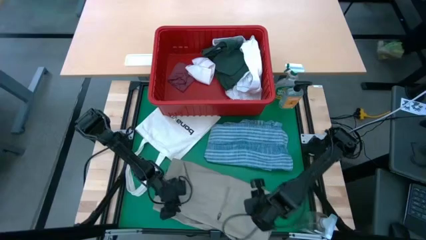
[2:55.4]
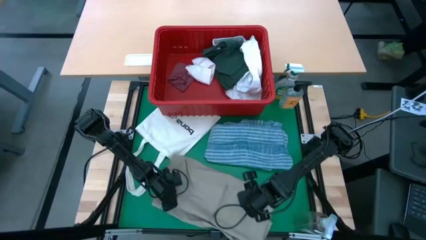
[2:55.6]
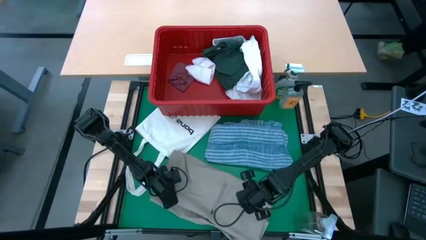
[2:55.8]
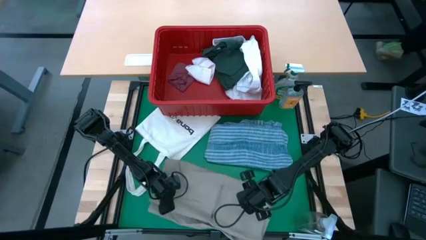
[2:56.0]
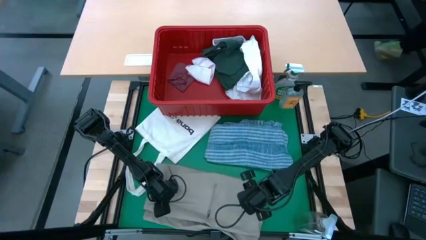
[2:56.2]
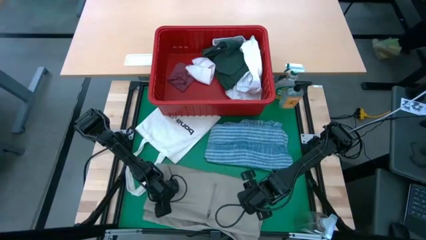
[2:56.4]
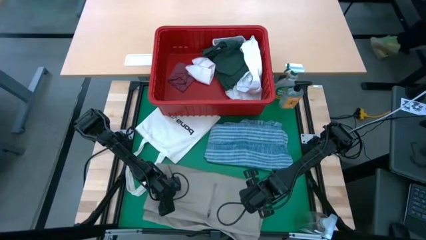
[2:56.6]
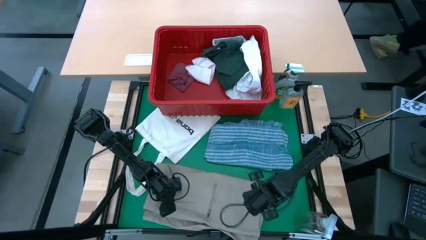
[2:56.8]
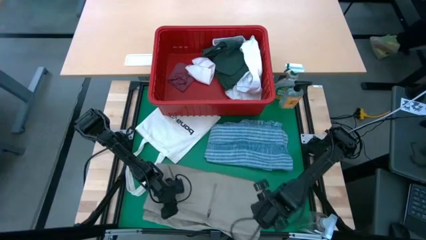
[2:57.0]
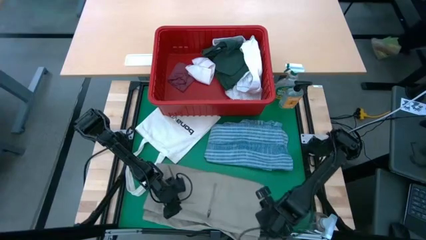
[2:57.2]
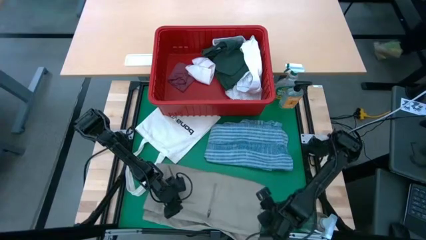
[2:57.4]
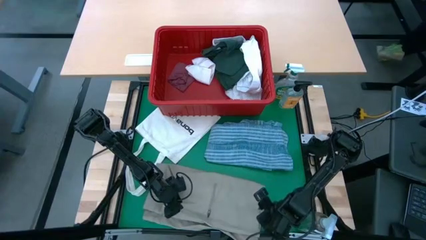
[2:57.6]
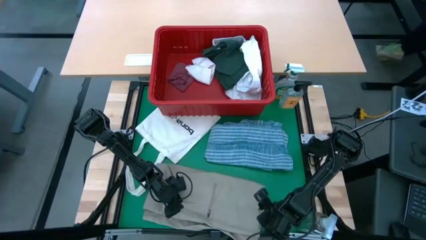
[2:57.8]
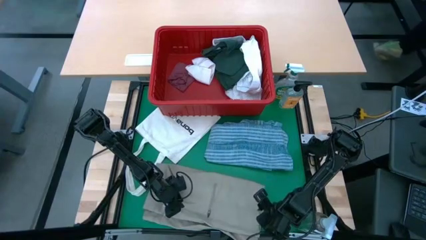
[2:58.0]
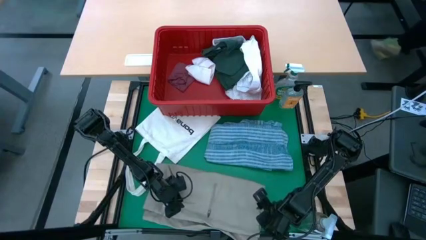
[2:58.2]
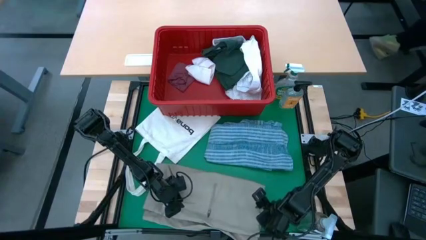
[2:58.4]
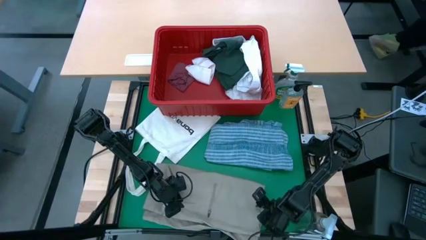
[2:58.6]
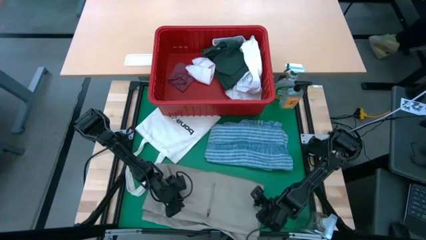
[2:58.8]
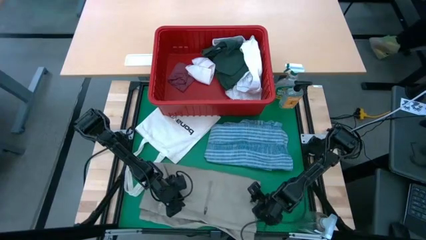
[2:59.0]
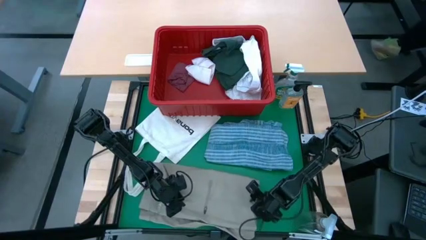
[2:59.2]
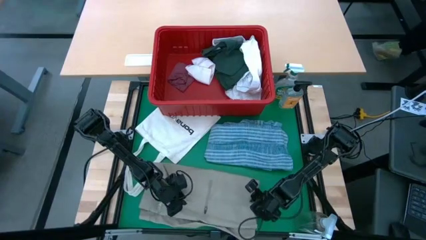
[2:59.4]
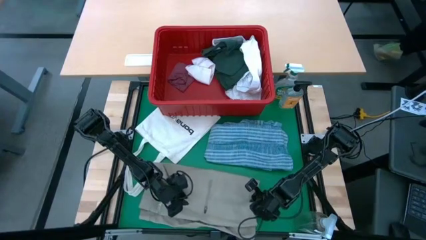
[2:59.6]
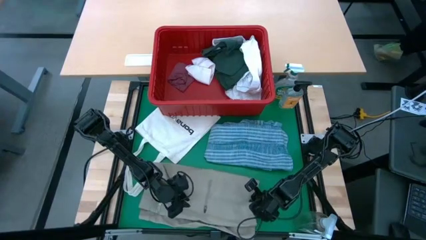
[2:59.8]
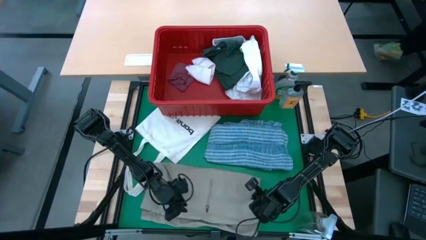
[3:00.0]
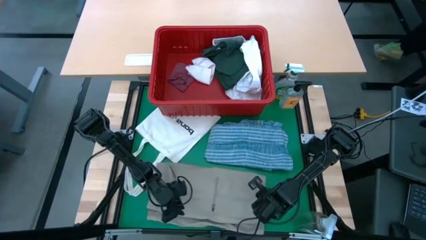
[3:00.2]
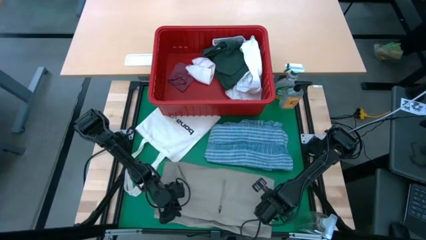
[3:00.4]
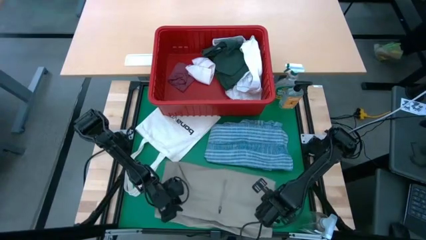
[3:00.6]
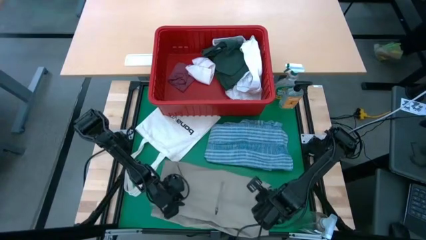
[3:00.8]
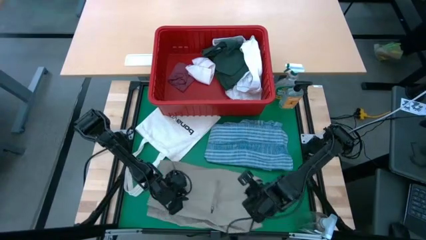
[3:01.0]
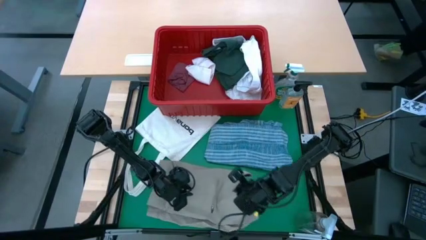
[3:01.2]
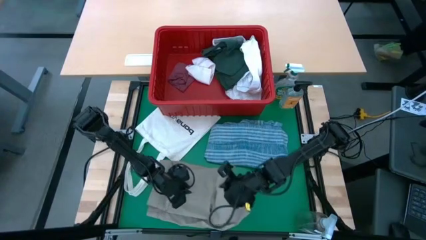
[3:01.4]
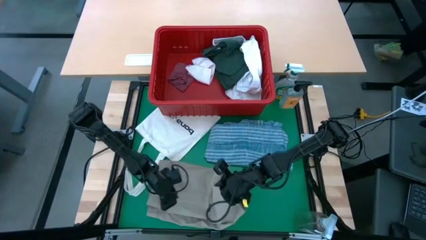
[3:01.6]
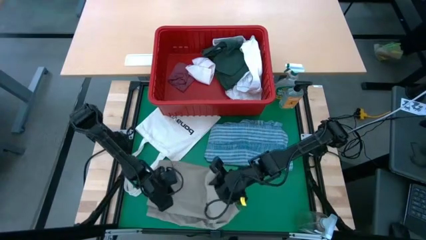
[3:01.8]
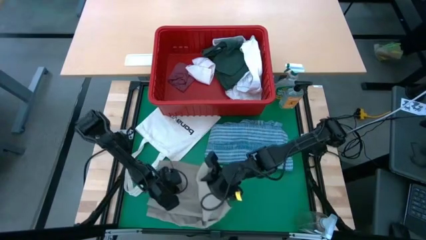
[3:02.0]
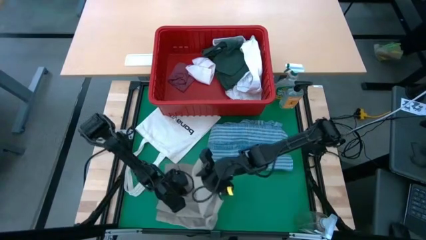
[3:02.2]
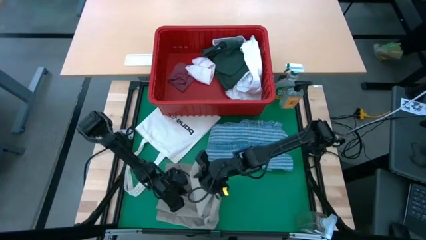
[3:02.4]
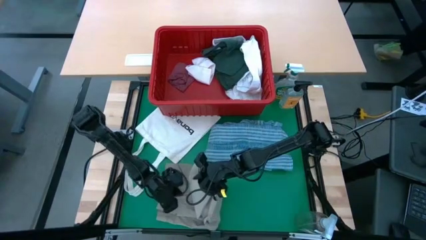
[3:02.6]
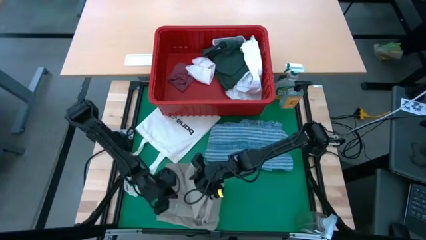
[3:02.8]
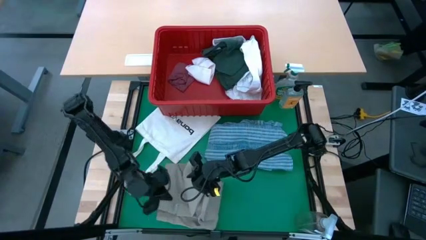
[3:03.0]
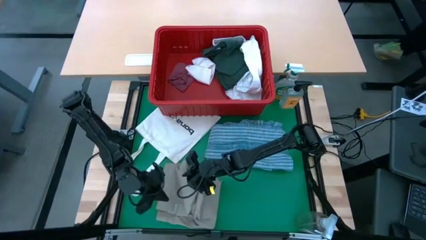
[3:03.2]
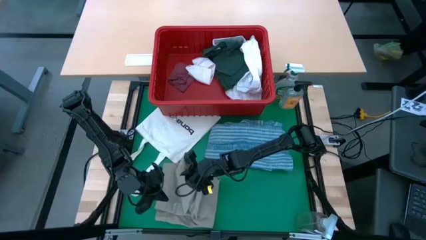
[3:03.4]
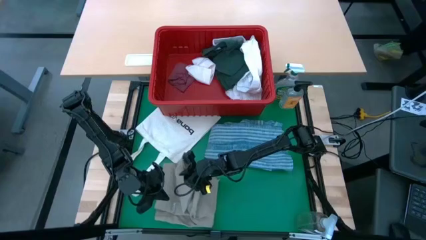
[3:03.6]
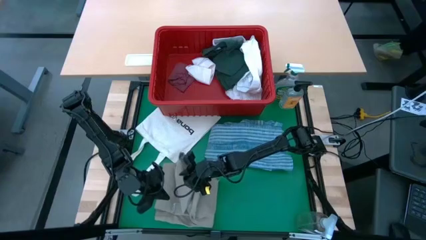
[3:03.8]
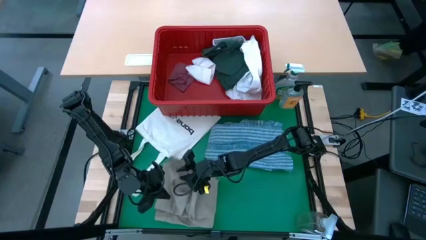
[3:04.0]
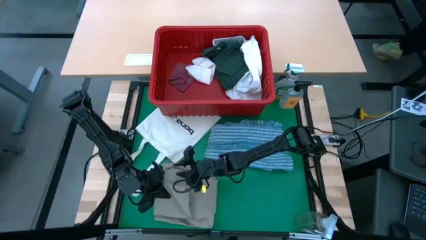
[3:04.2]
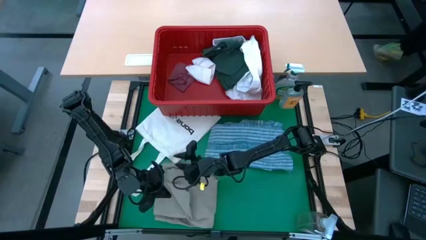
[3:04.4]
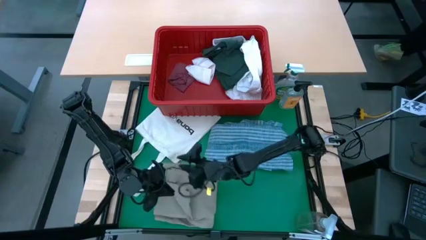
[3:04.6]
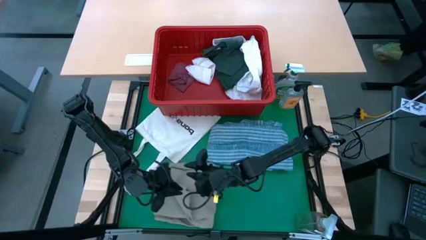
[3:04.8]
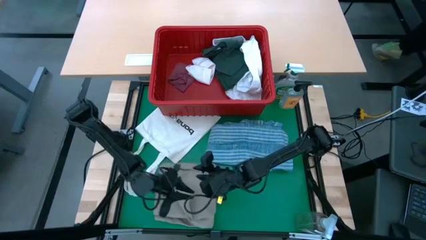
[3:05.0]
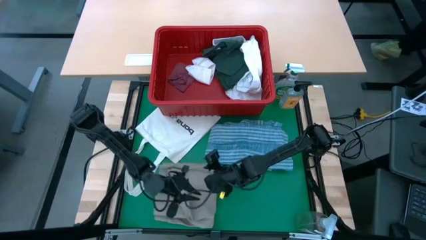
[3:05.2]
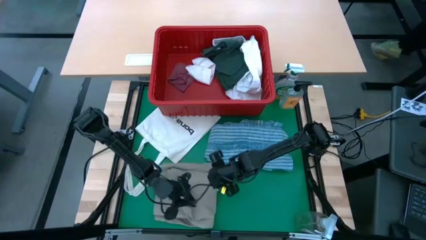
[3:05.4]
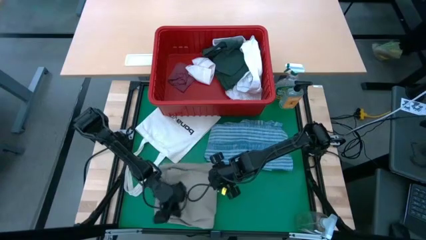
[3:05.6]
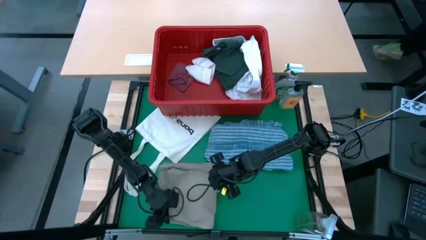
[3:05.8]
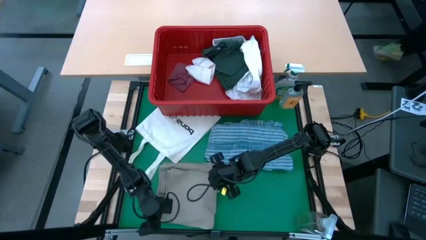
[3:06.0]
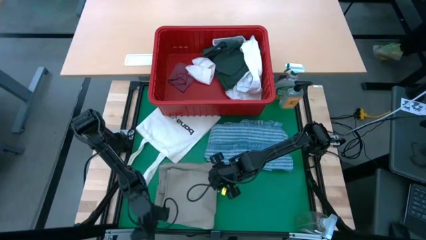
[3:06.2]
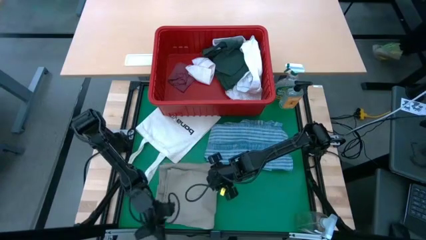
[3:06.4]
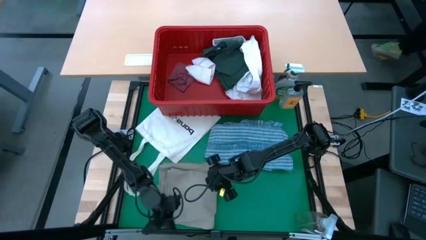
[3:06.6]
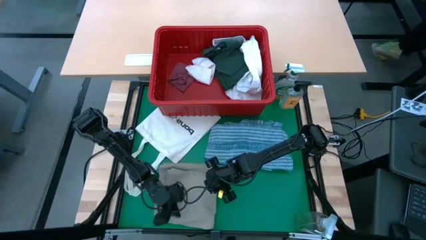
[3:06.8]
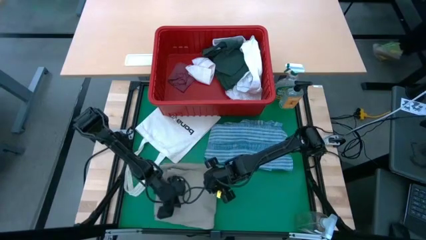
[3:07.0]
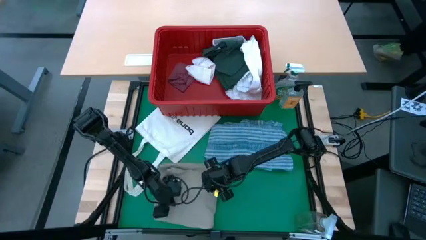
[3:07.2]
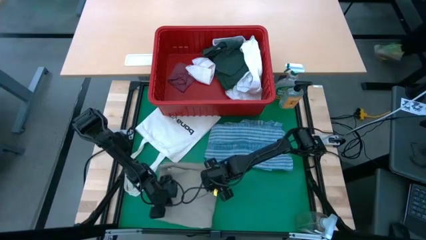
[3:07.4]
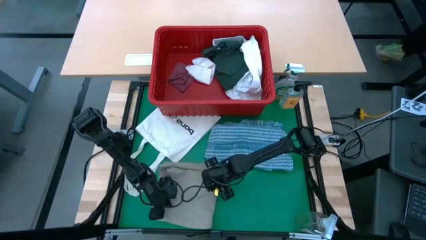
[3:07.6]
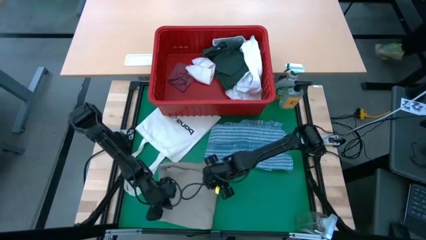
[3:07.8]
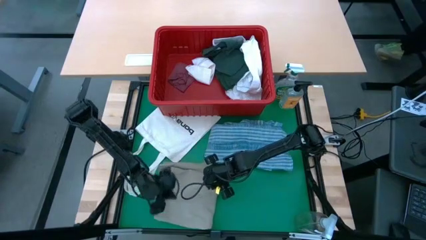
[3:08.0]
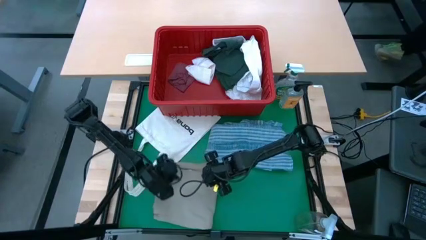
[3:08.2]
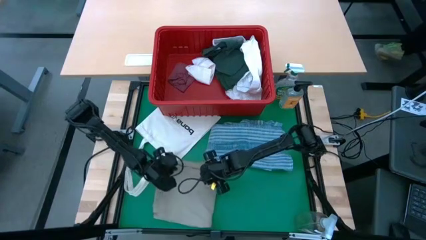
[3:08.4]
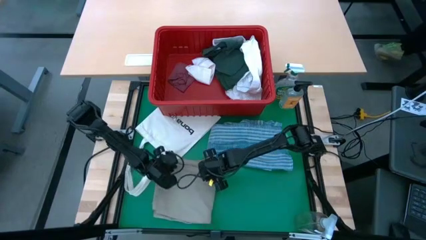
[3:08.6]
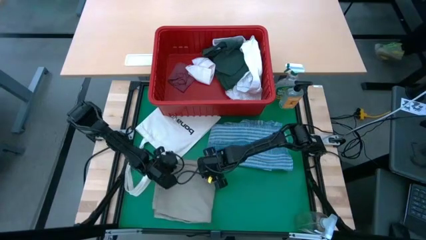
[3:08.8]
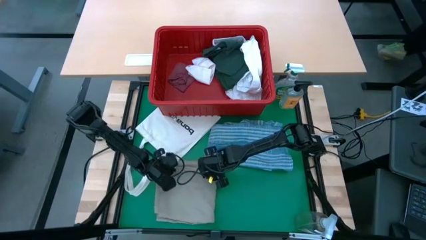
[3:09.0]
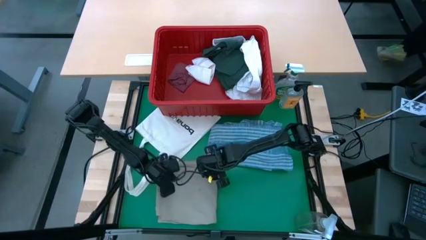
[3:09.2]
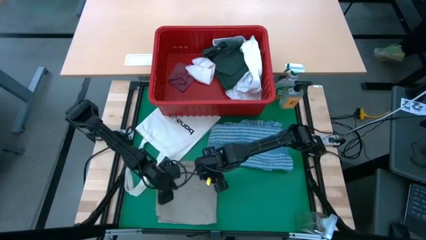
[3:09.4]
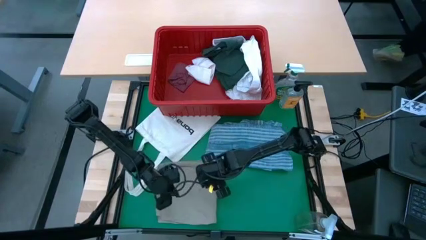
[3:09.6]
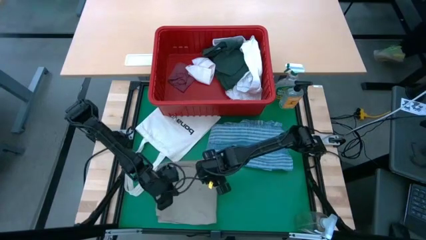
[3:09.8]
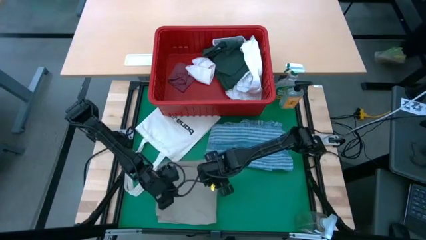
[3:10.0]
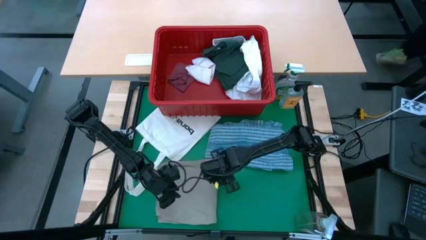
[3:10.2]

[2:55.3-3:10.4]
Task: Fold Laundry from Bin
Fold the brown shorts
